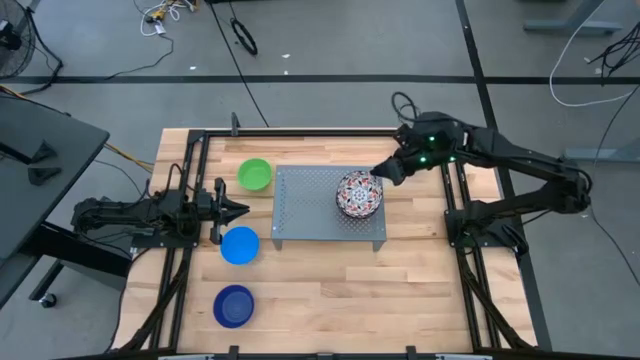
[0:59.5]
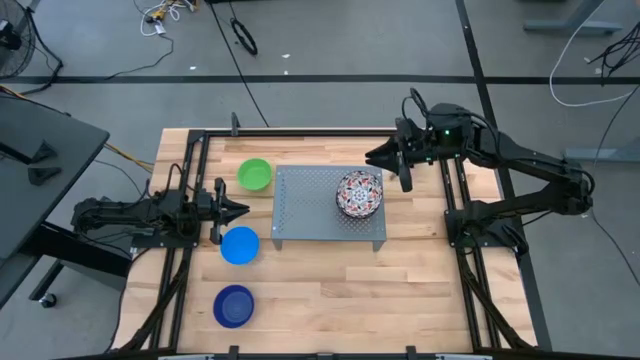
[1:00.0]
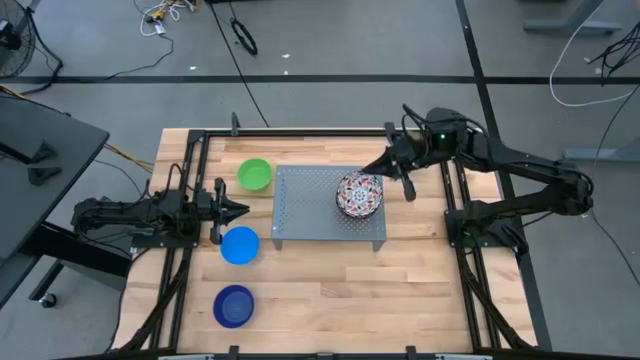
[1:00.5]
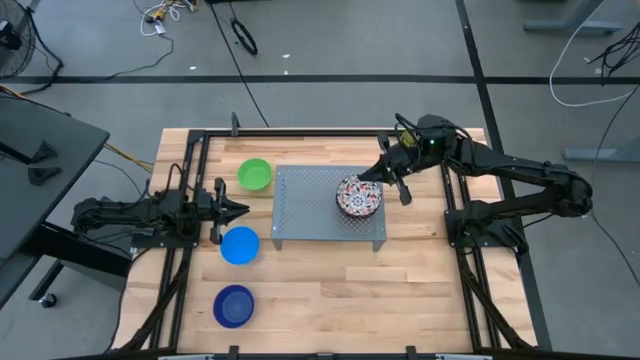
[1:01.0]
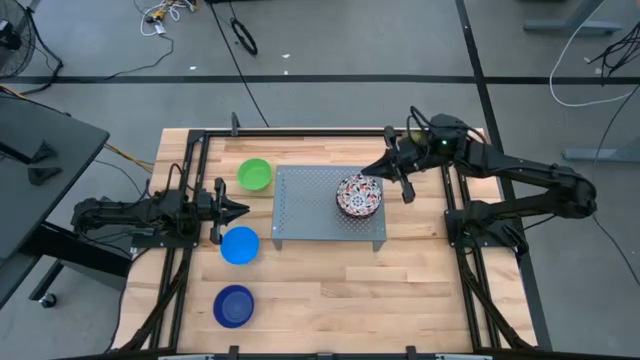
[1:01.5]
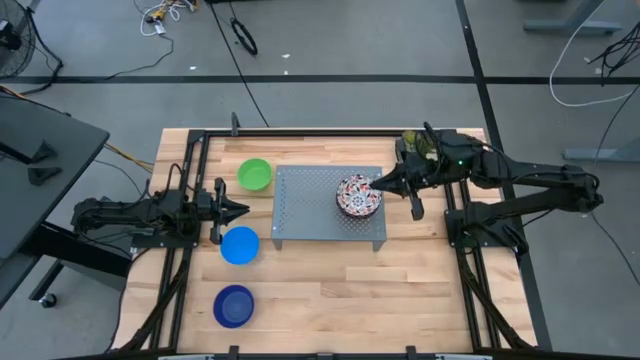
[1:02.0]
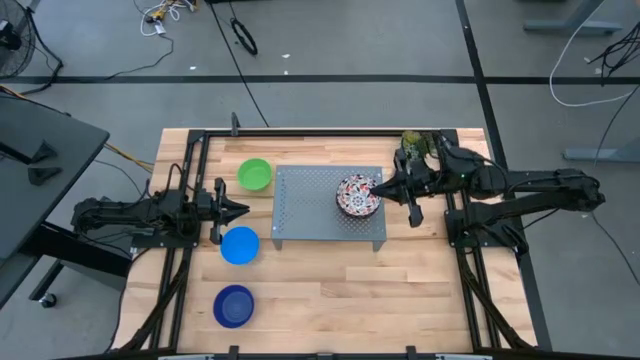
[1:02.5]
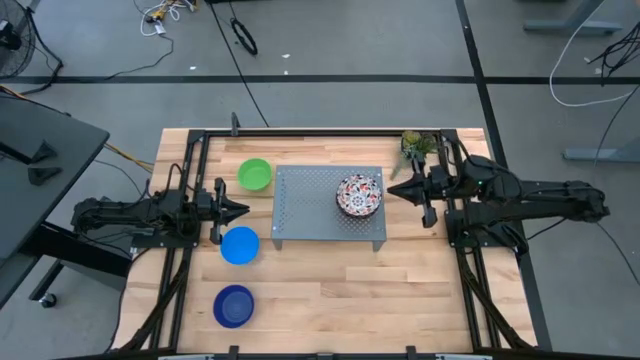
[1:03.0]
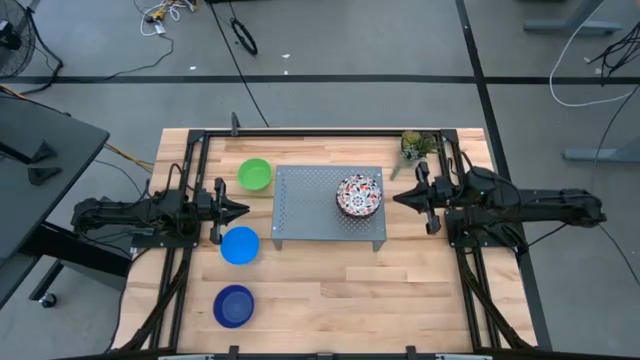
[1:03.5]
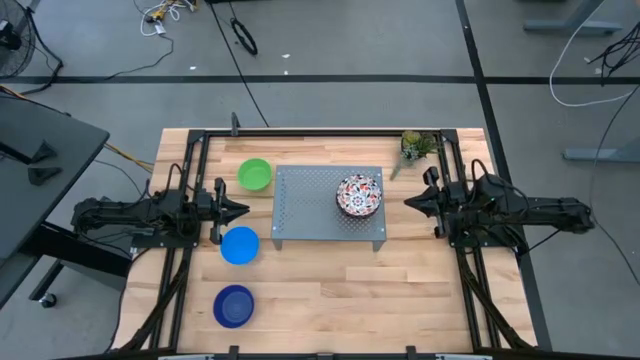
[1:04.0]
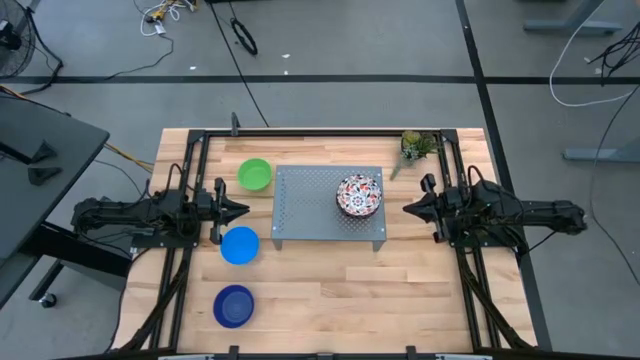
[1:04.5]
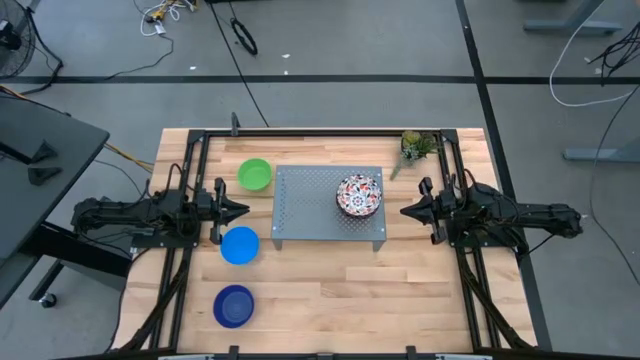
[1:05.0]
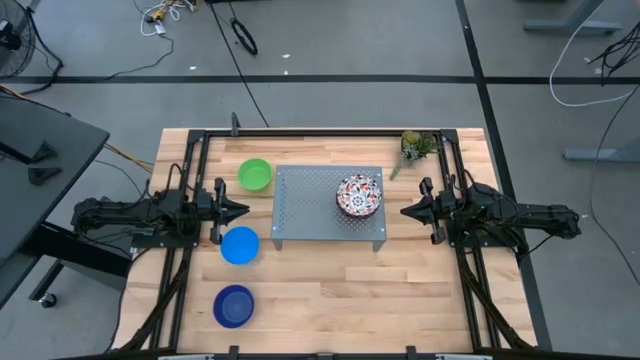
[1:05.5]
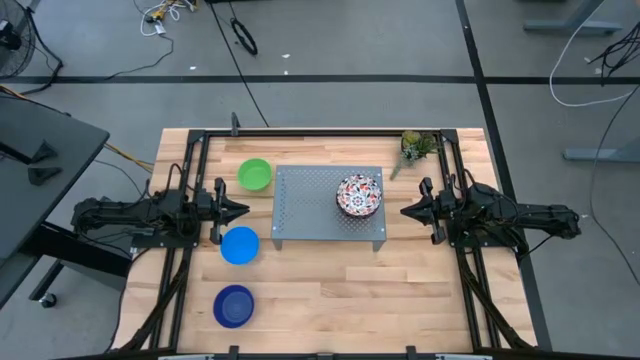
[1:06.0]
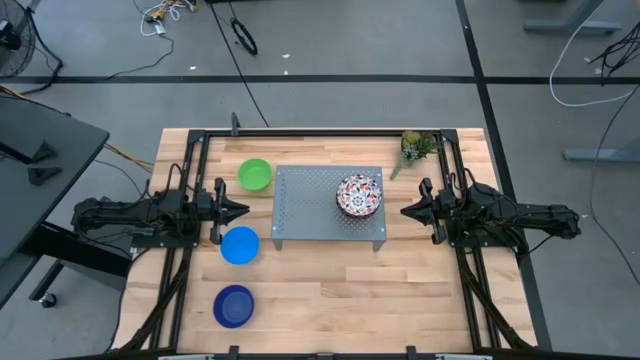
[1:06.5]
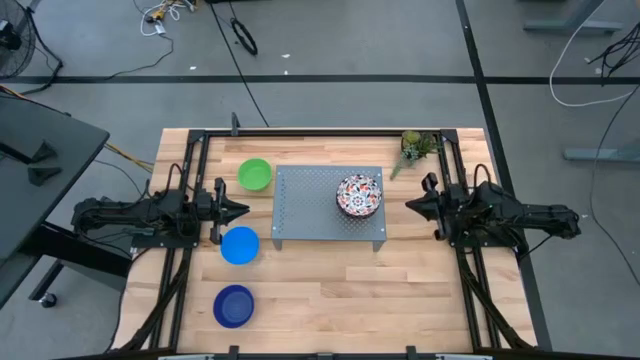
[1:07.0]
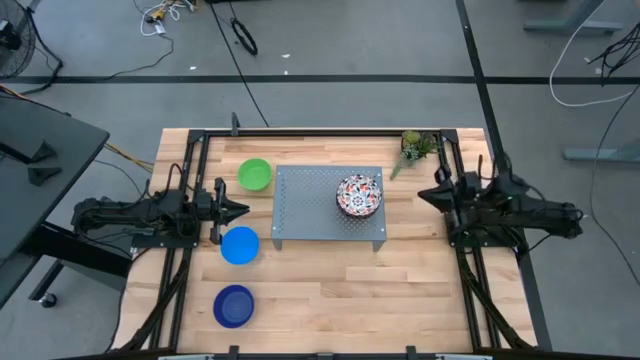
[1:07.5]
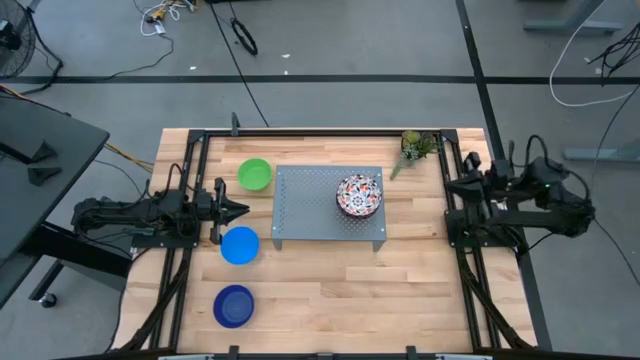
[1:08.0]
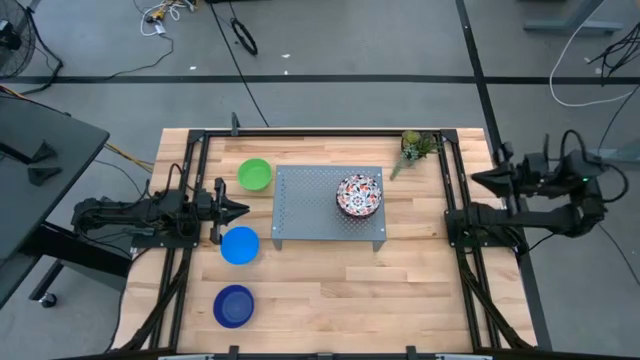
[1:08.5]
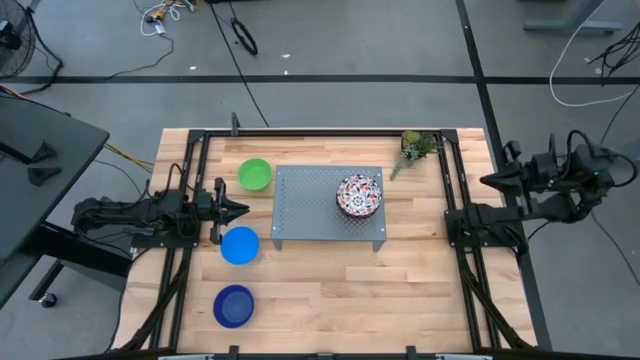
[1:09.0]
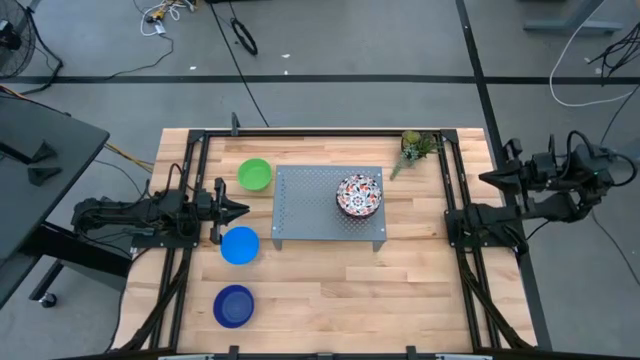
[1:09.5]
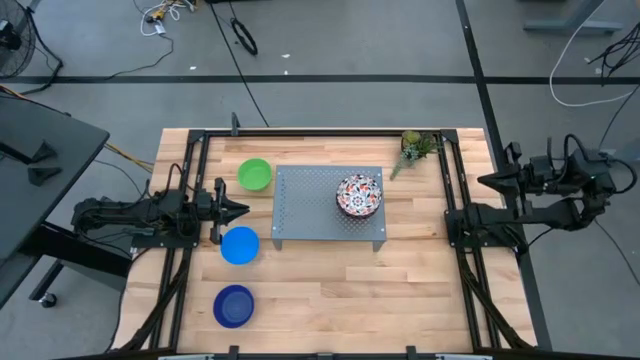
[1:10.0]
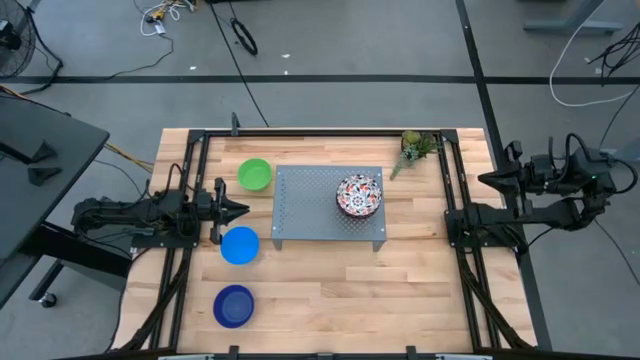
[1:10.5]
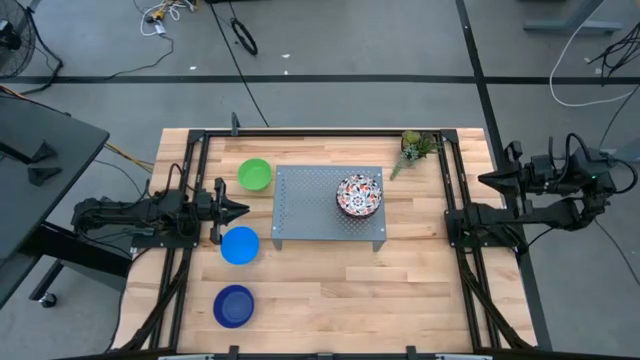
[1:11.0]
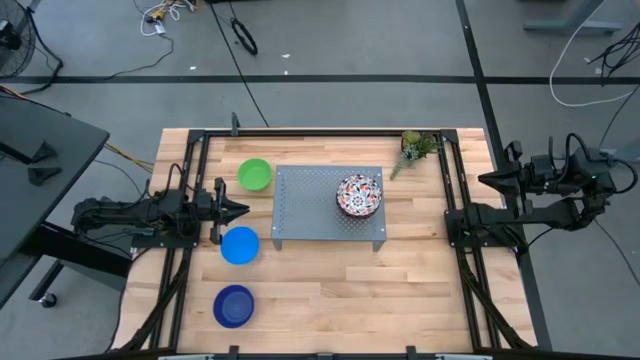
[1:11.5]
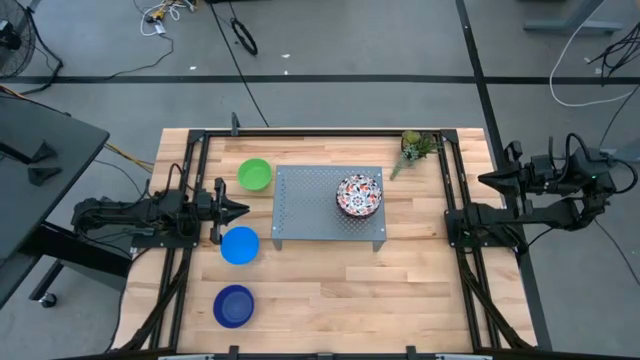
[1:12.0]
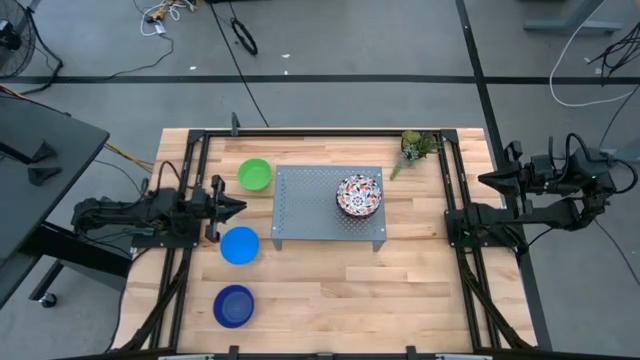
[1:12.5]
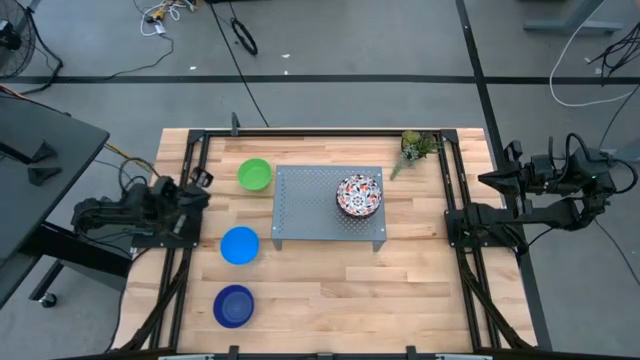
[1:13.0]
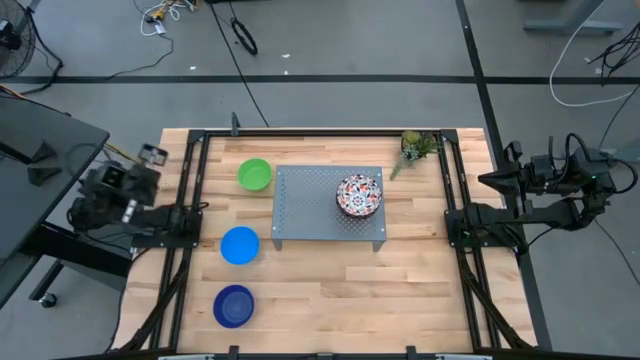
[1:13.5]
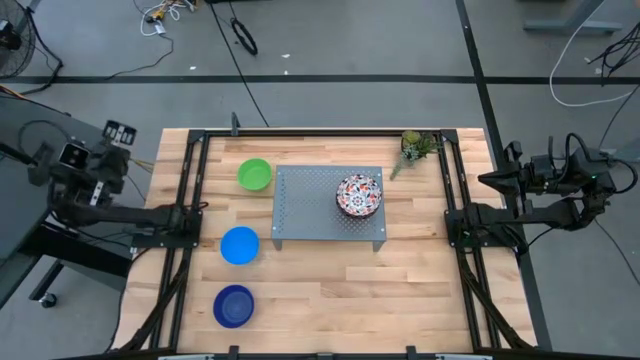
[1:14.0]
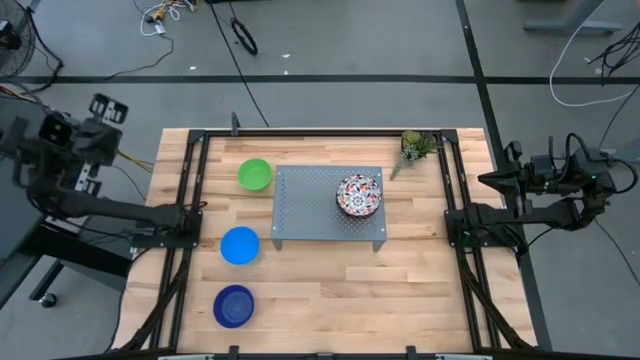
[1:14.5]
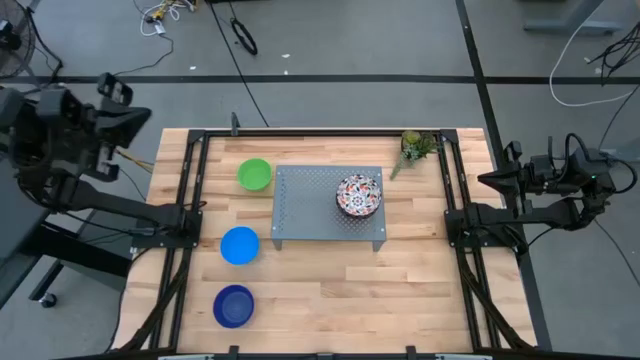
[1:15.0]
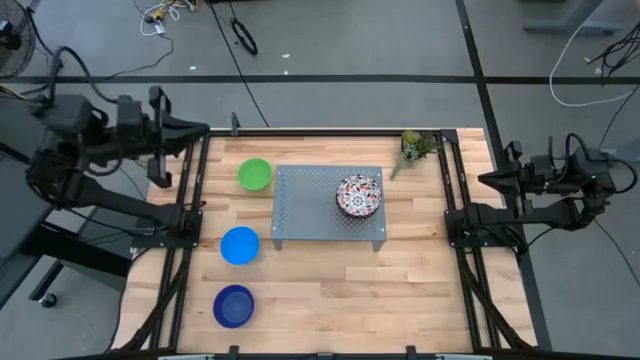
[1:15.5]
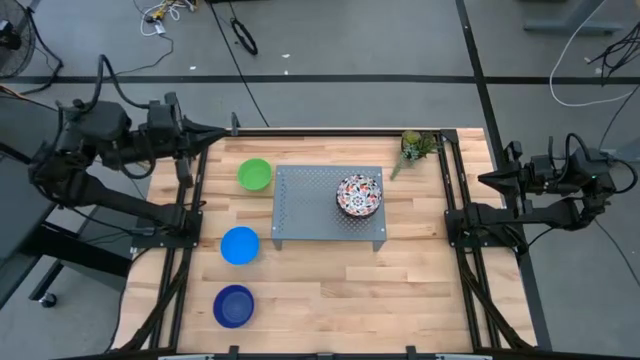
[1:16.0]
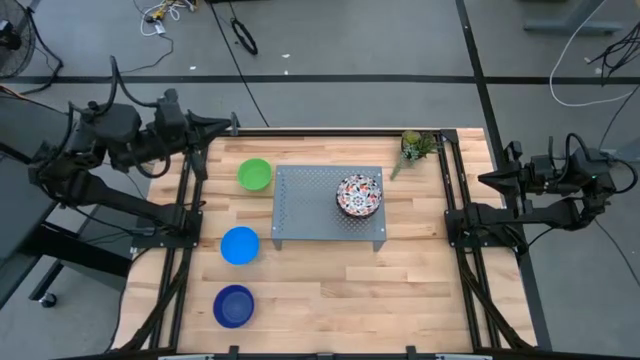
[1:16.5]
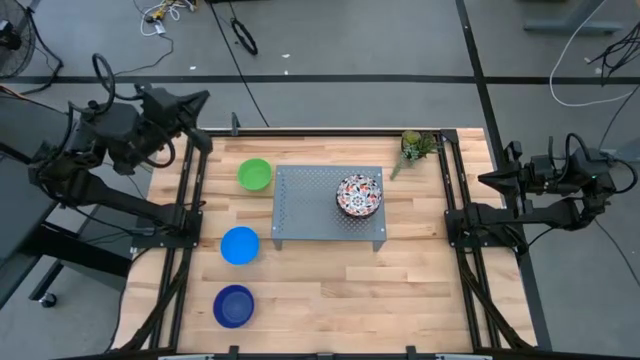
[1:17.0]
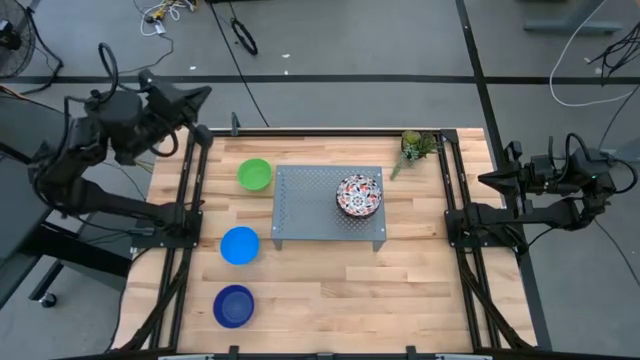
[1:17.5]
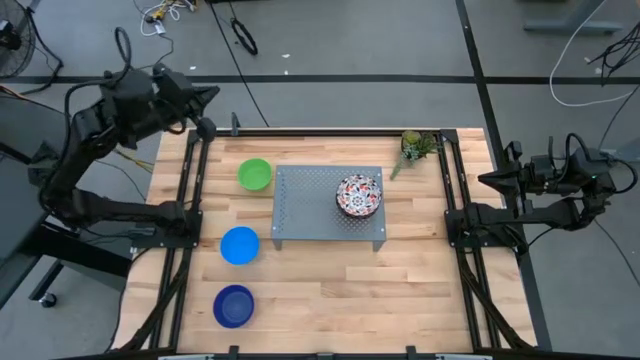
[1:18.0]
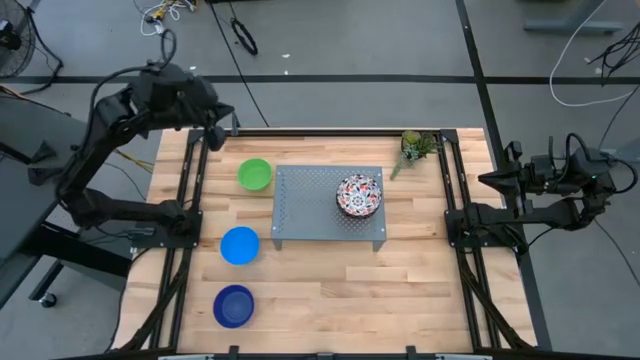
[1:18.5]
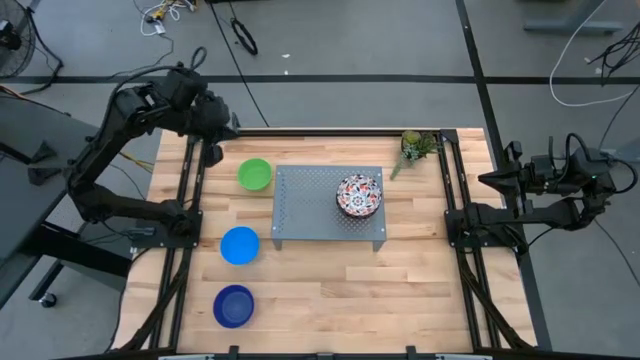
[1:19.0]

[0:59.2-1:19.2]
Task: Pick & Place Mini bowls
Put the light green plastic bowl on the shelf

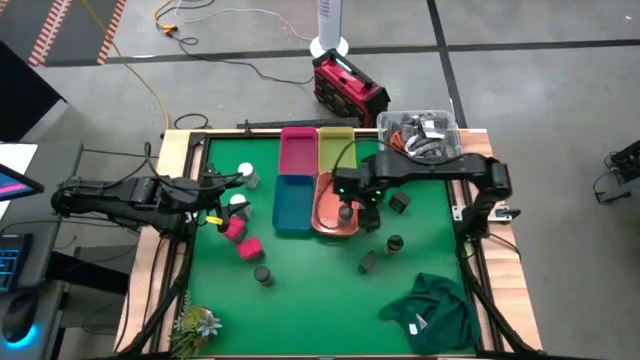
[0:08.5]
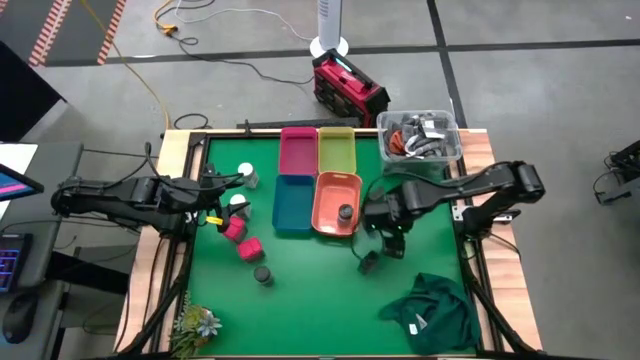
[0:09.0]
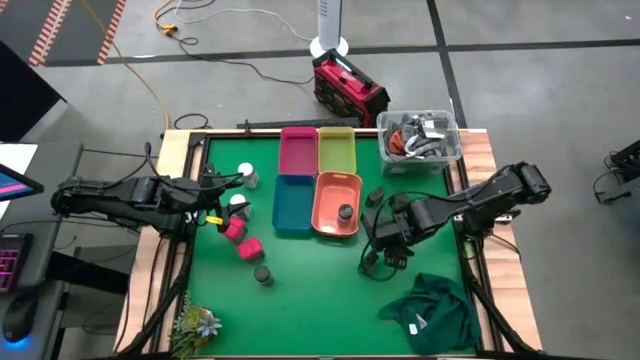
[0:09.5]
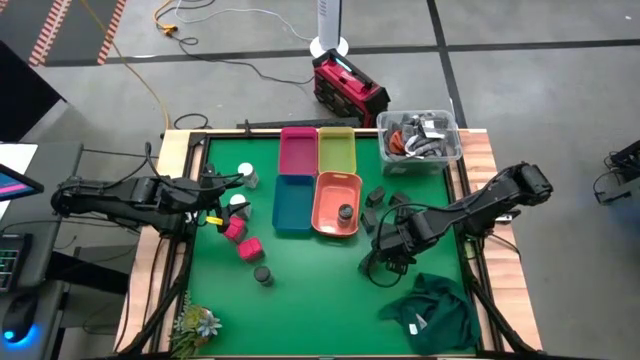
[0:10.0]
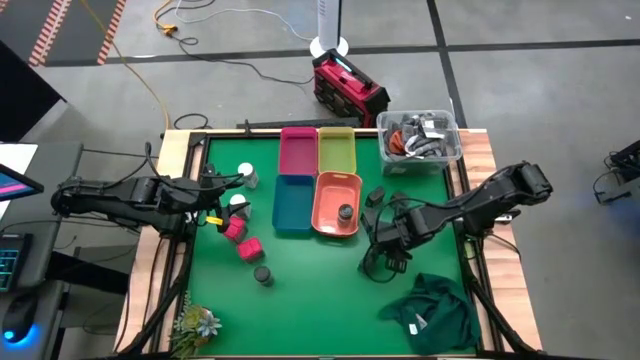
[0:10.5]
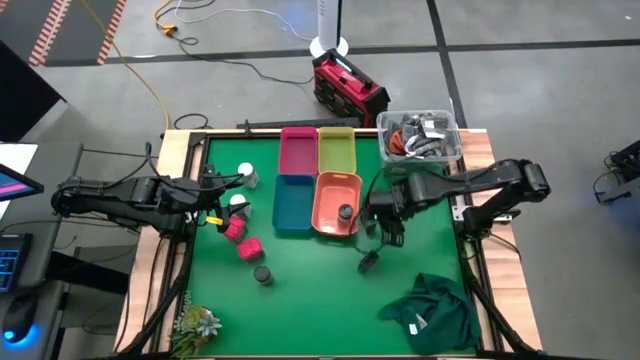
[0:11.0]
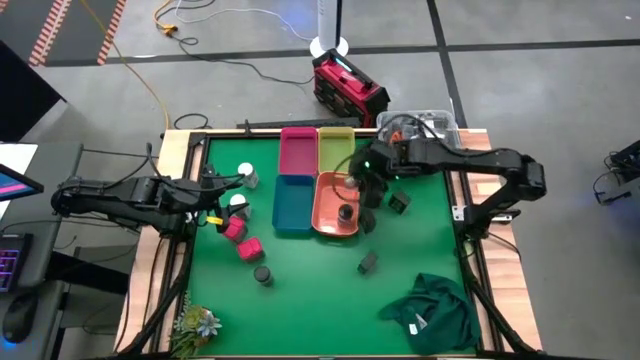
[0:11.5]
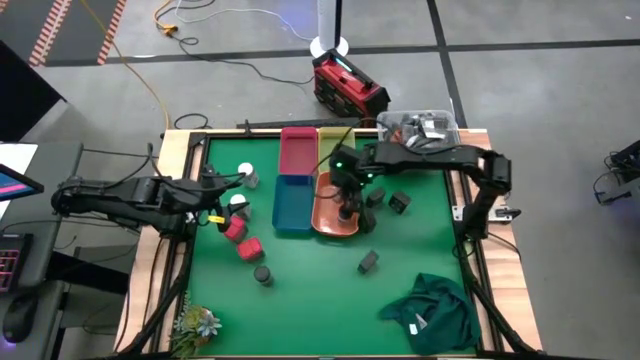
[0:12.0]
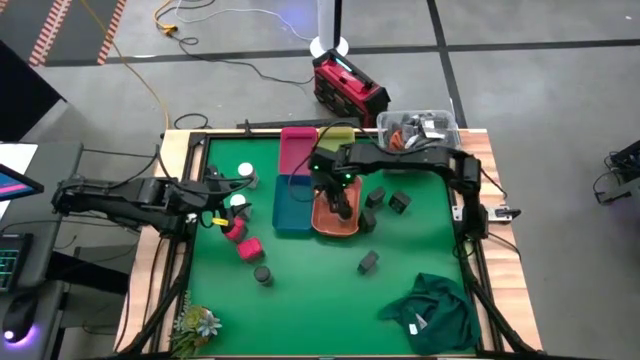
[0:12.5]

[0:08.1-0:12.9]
Task: Sort spices by type
Put the right black seasoning bottle into the orange tray
